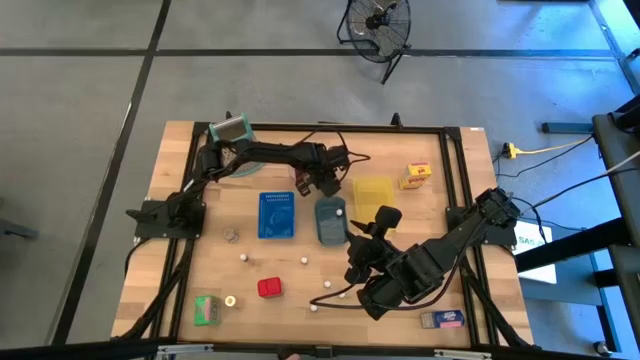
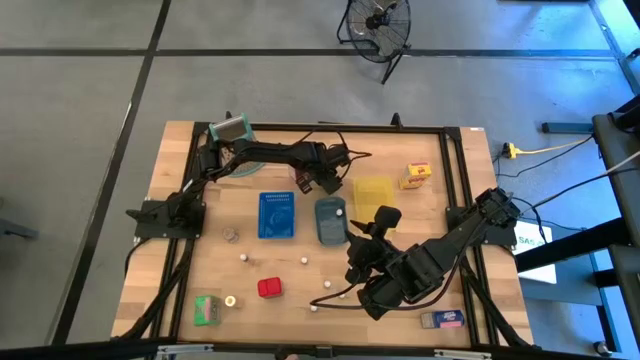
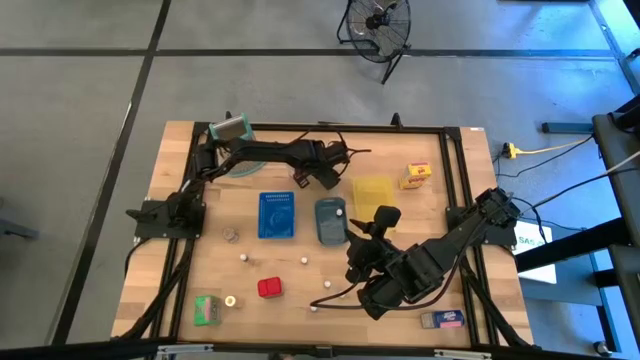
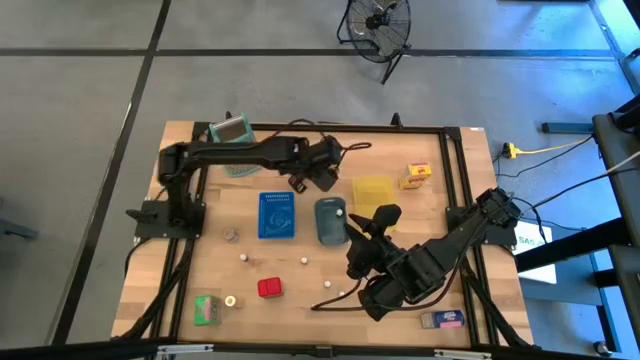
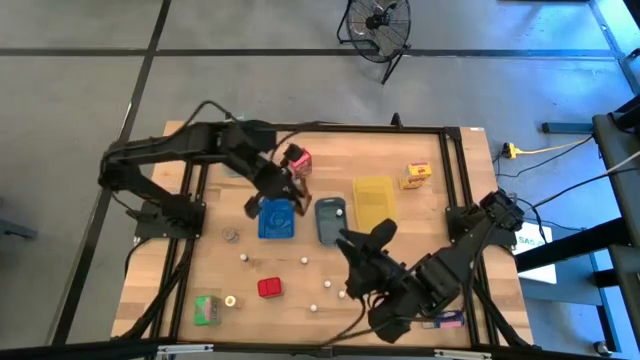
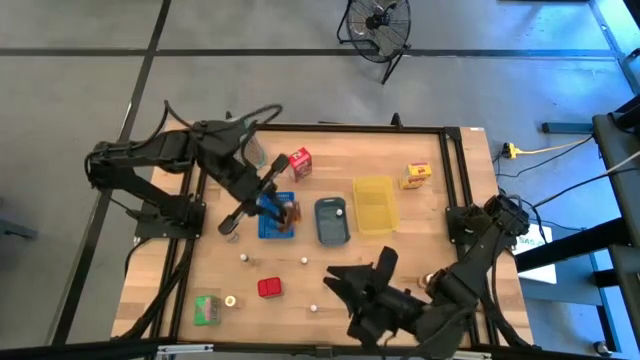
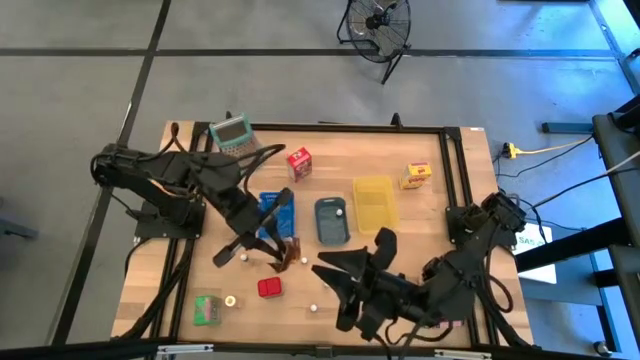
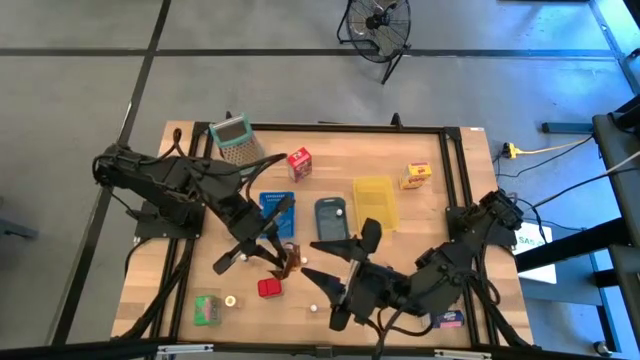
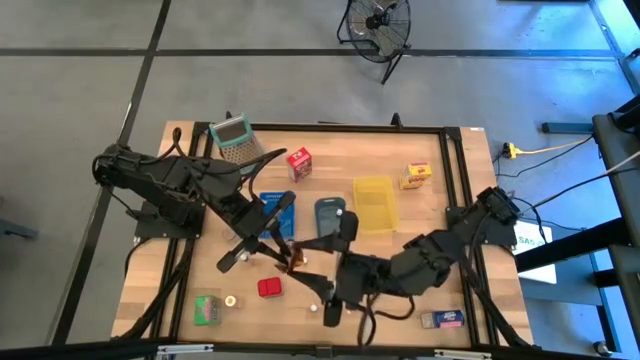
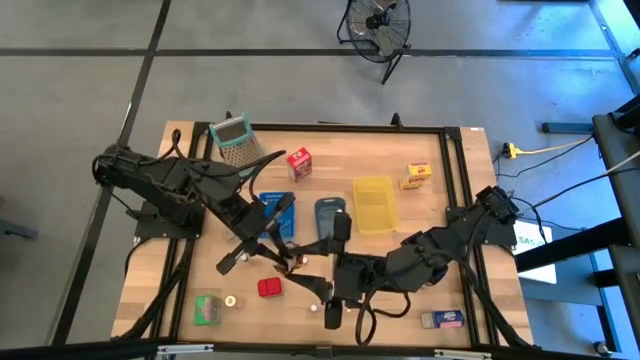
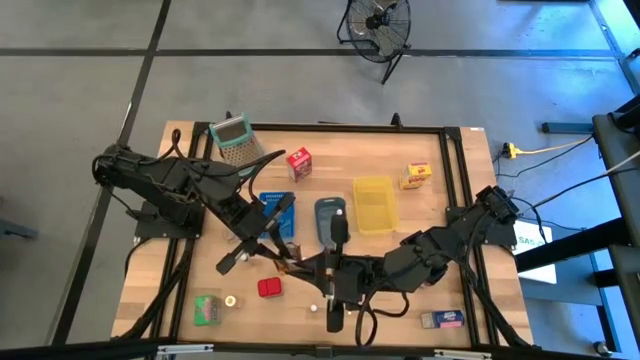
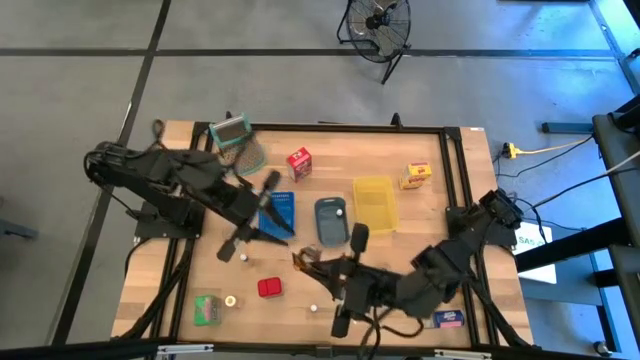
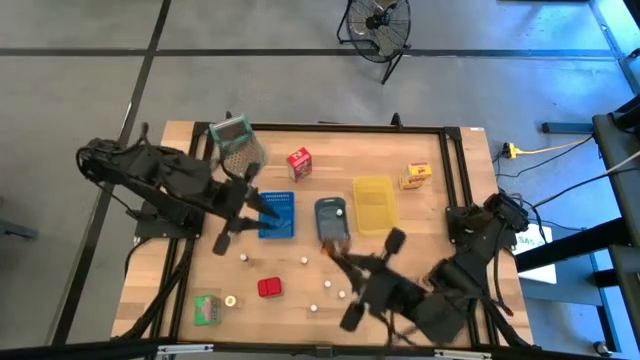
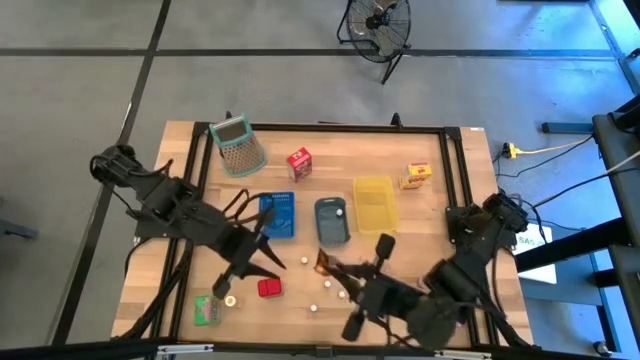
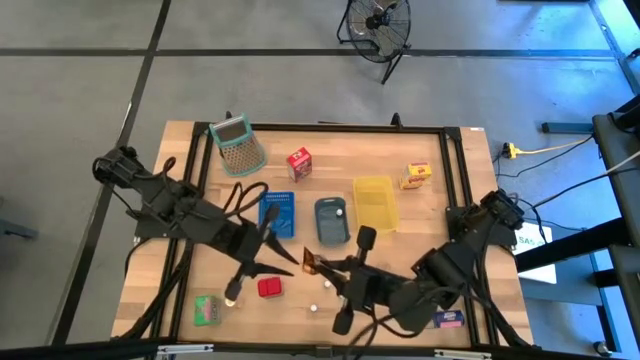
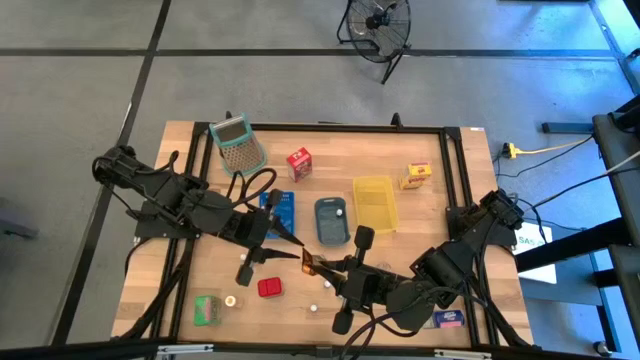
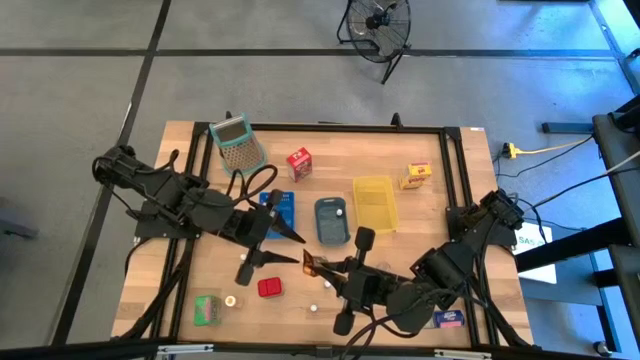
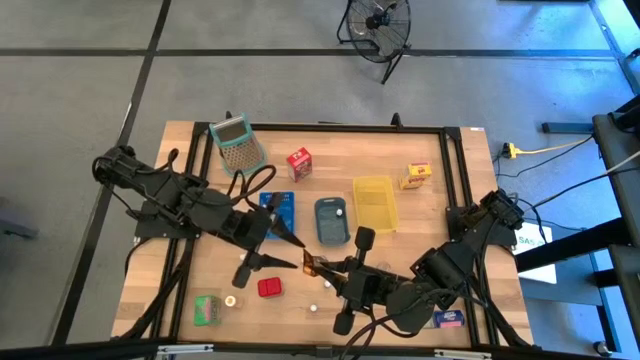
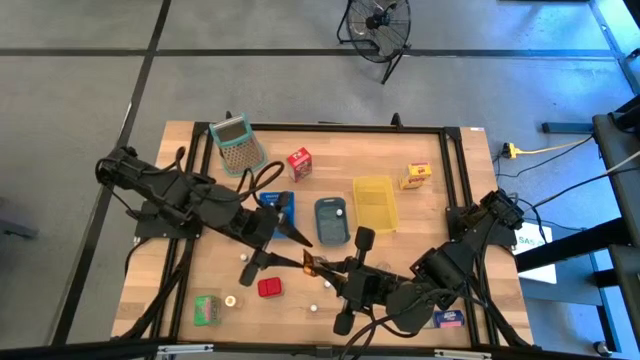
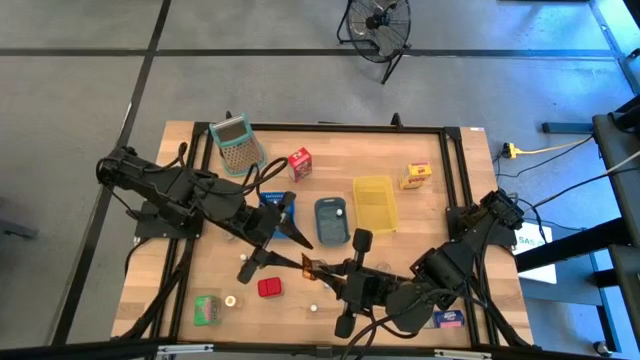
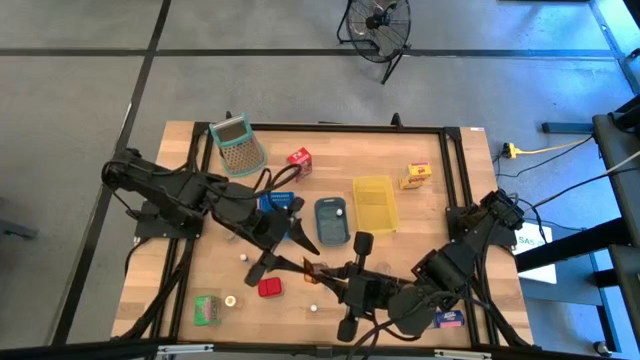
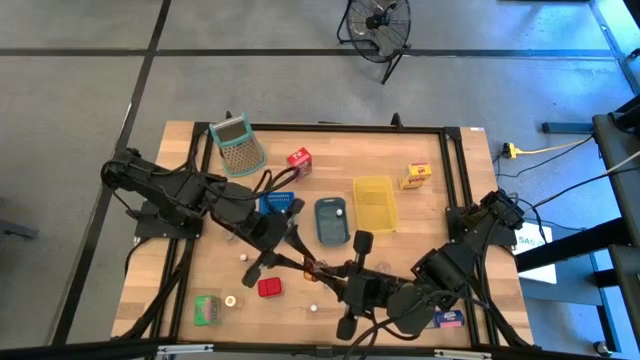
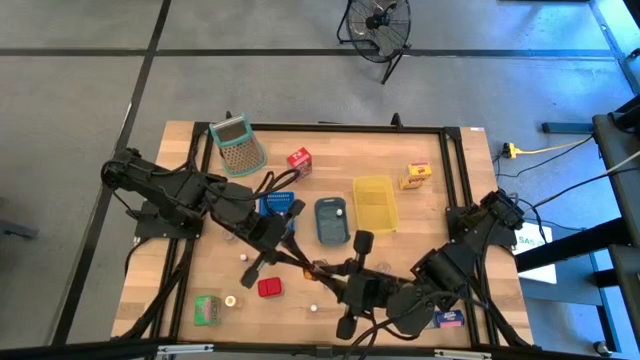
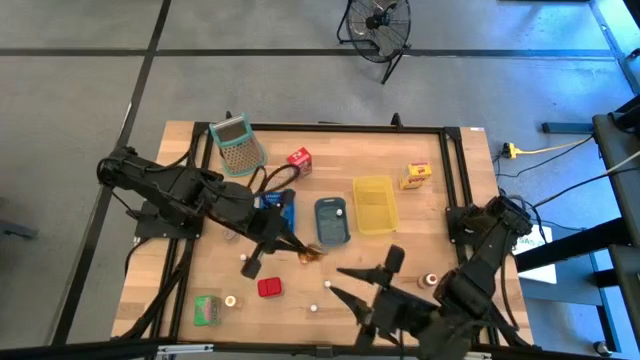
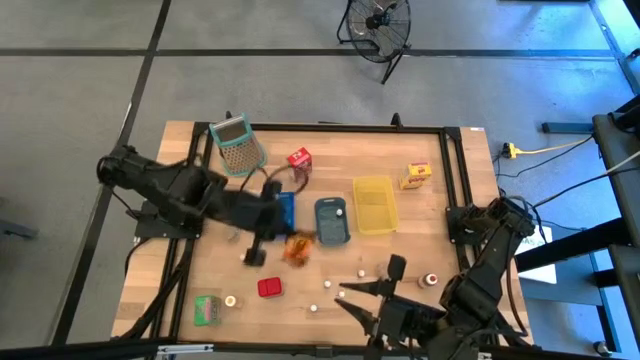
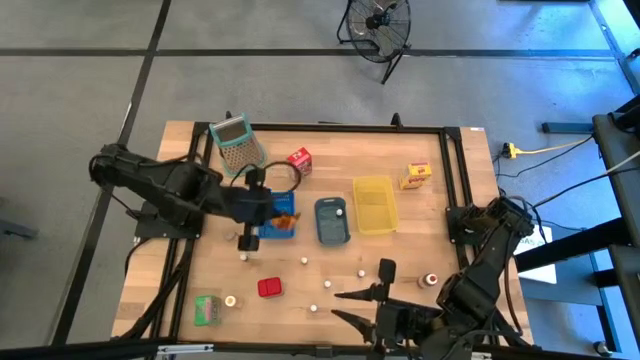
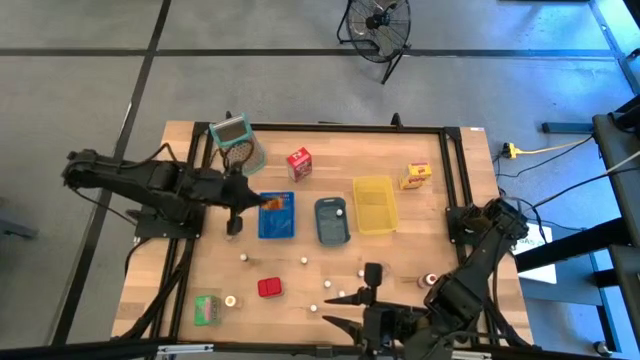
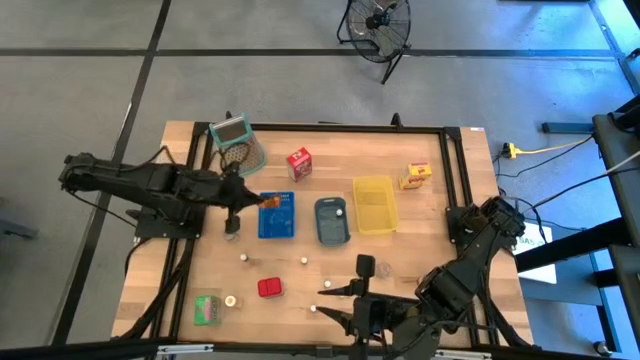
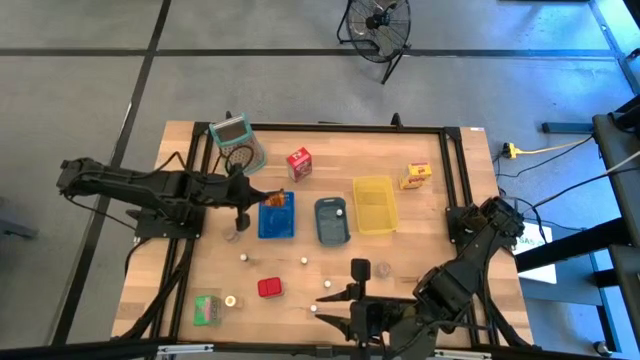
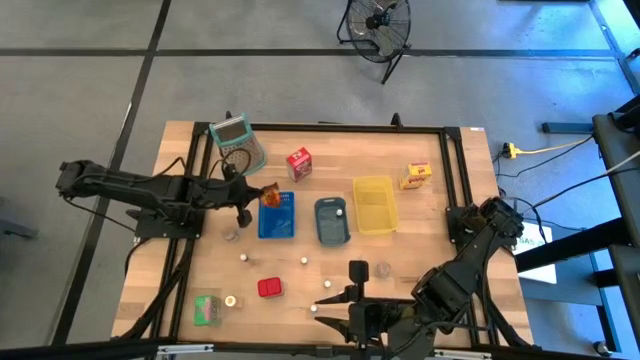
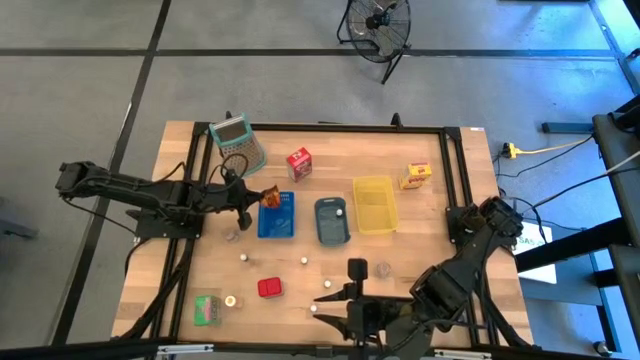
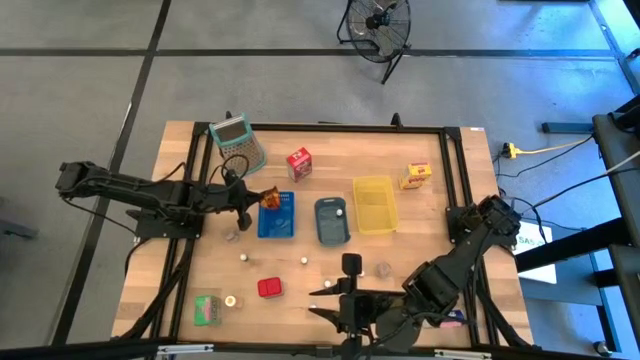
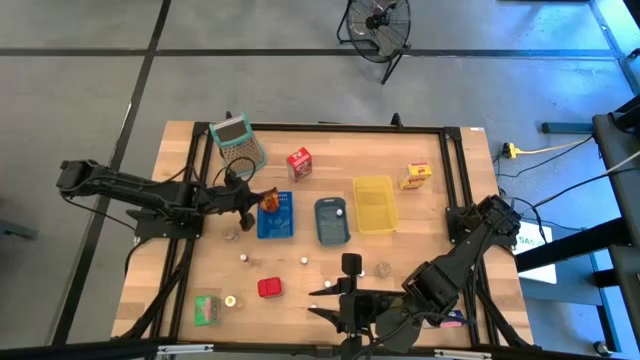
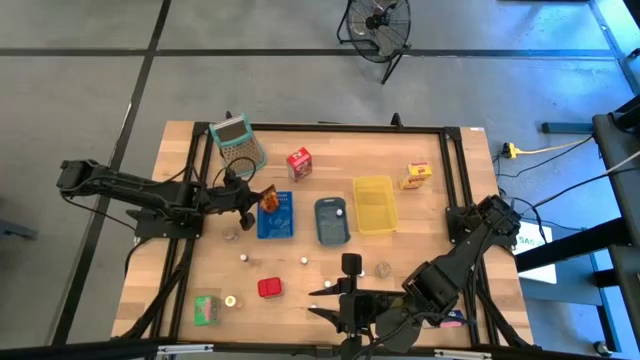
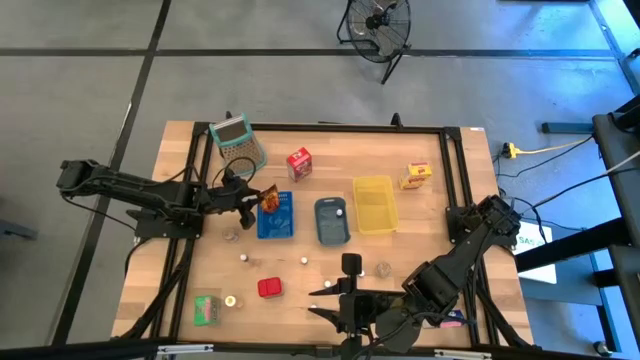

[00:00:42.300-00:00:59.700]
Task: Pick & Place Kitchen Items
Put the orange seasoning pack into the blue bin

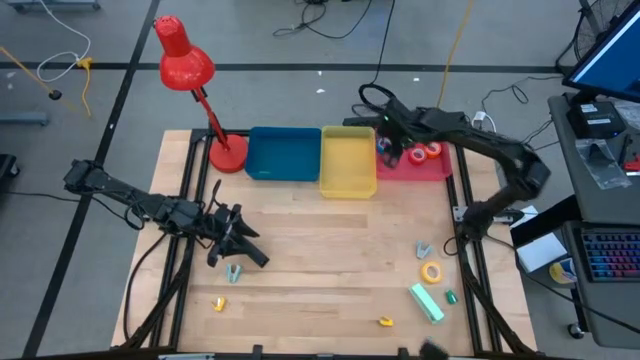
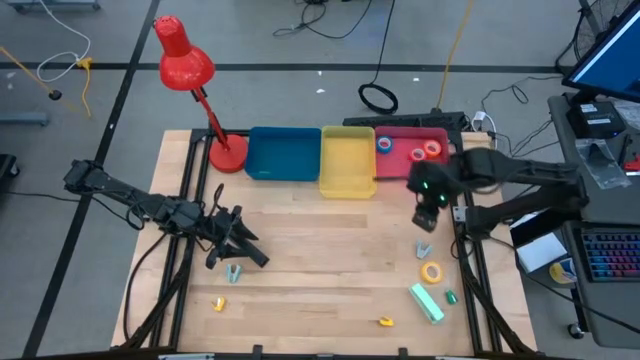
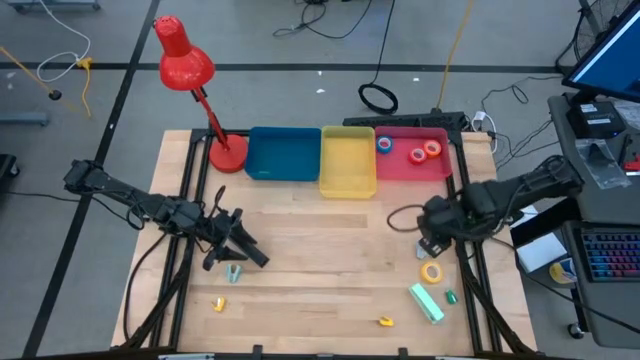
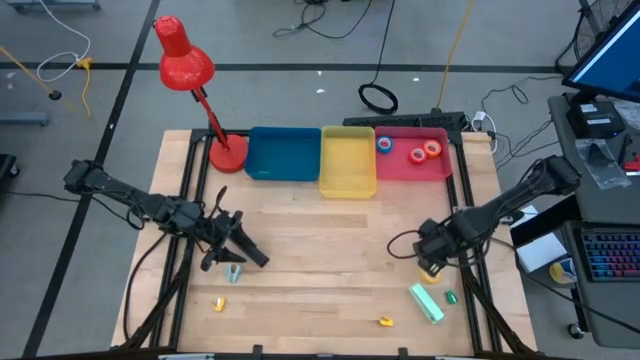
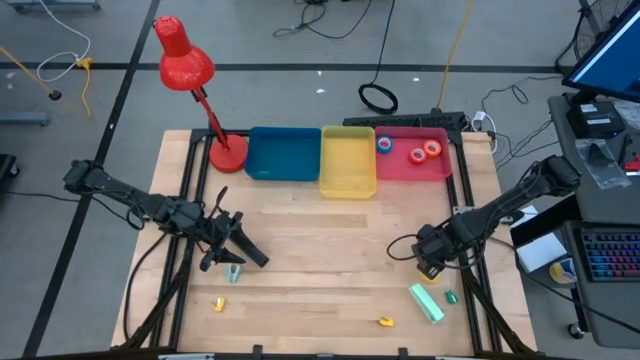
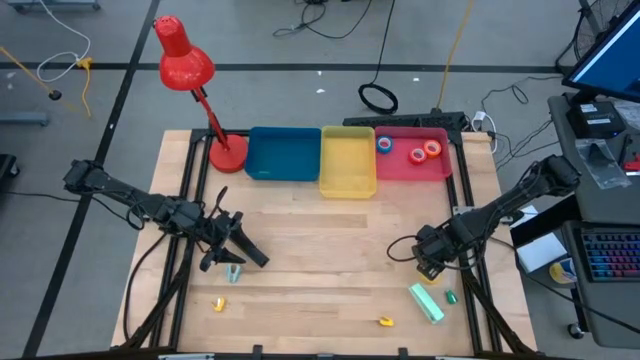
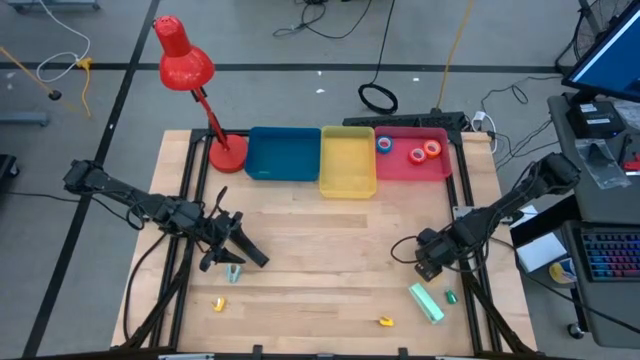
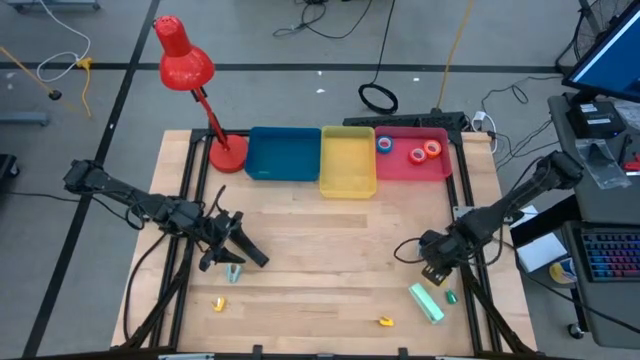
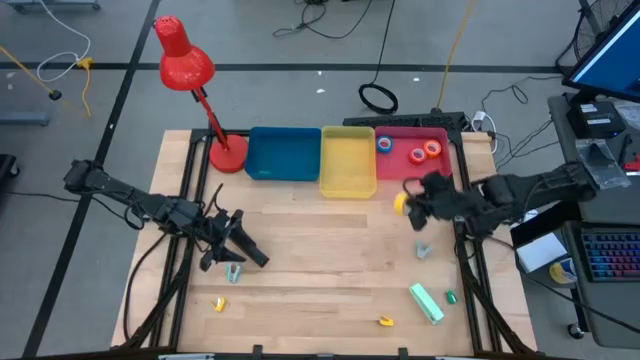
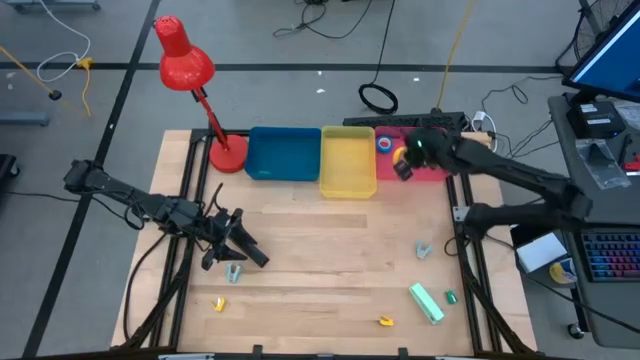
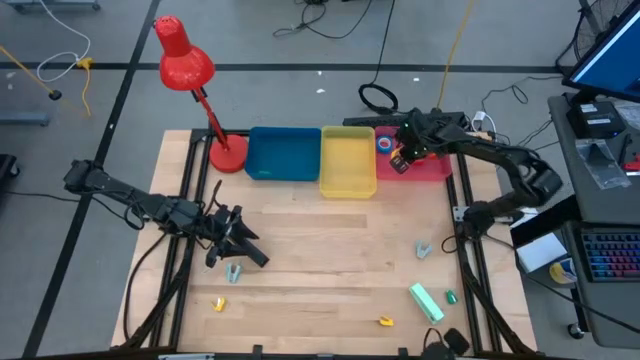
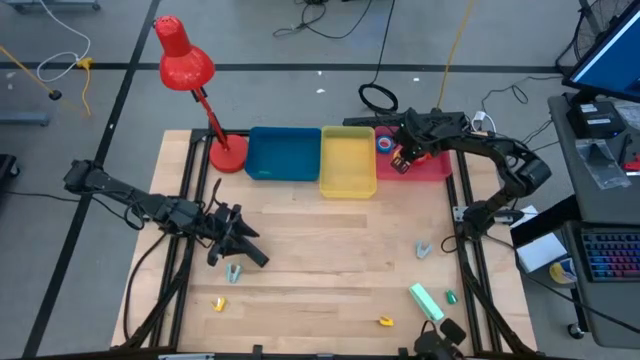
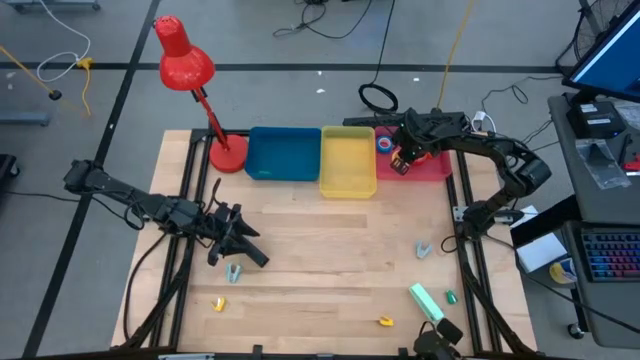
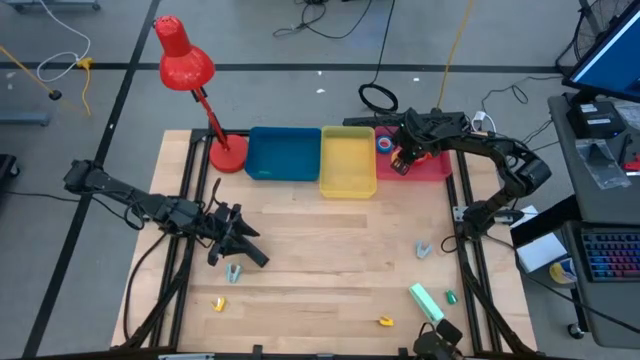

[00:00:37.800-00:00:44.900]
Task: Pick and place Stapler, Stapler remover, tape
Put the yellow tape into the red bin
